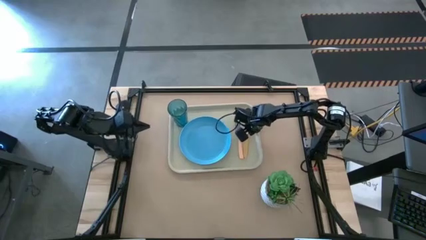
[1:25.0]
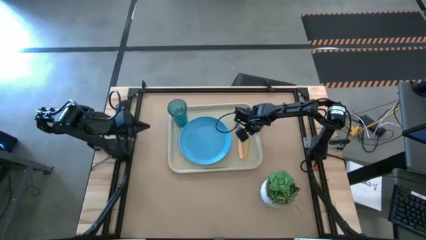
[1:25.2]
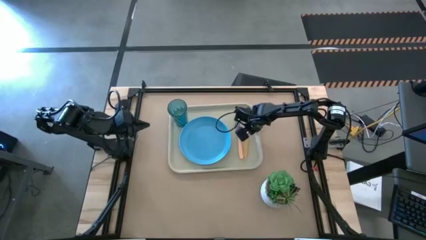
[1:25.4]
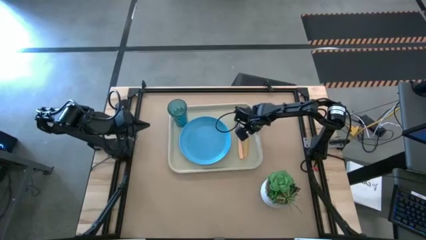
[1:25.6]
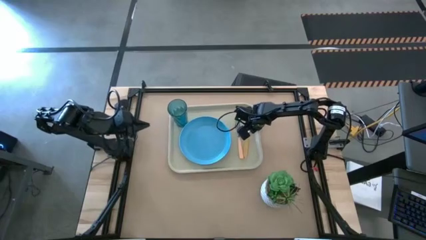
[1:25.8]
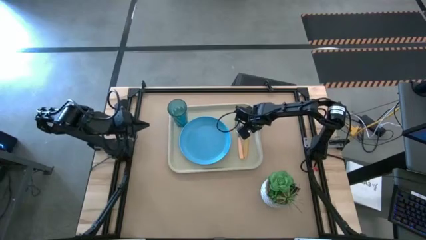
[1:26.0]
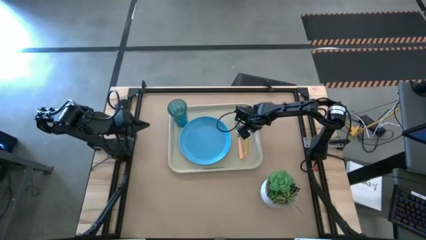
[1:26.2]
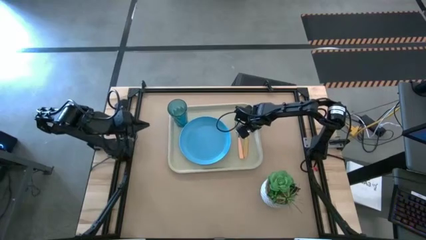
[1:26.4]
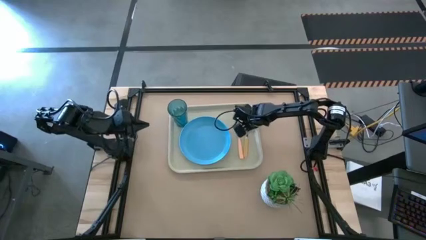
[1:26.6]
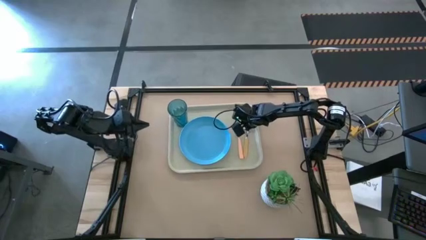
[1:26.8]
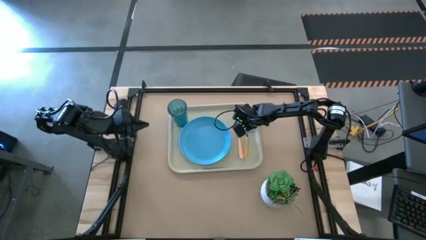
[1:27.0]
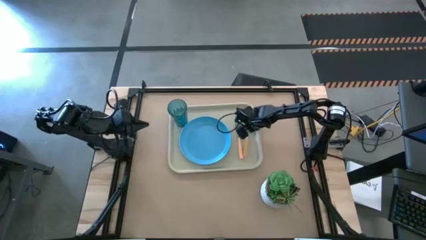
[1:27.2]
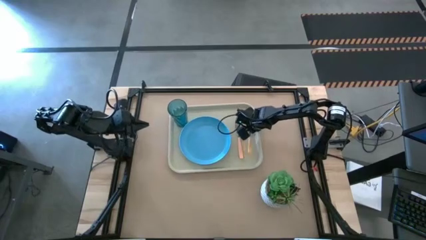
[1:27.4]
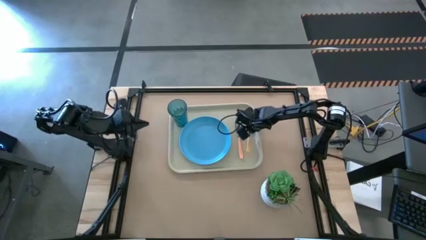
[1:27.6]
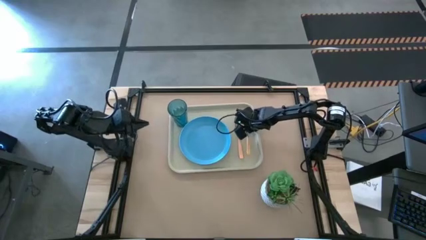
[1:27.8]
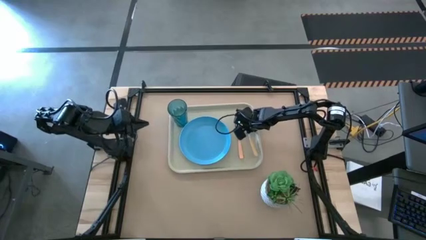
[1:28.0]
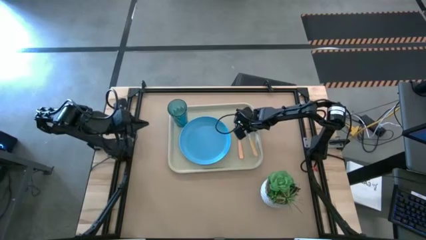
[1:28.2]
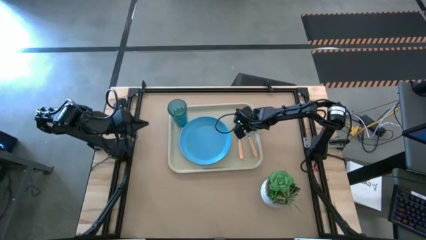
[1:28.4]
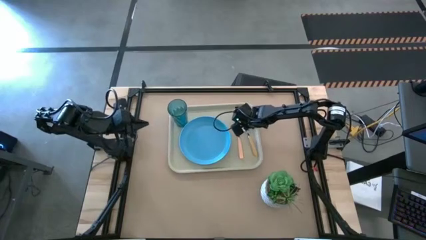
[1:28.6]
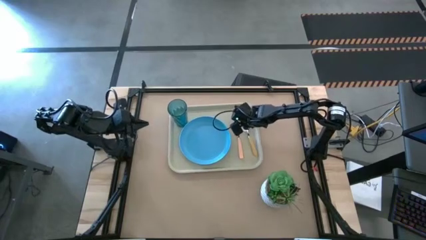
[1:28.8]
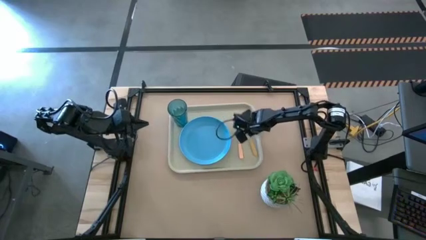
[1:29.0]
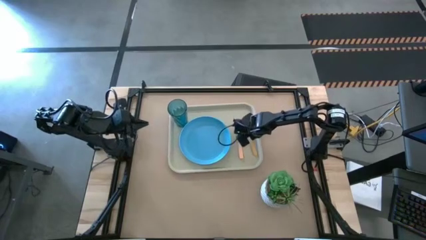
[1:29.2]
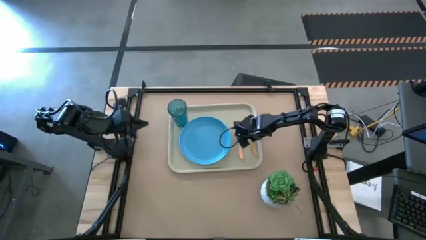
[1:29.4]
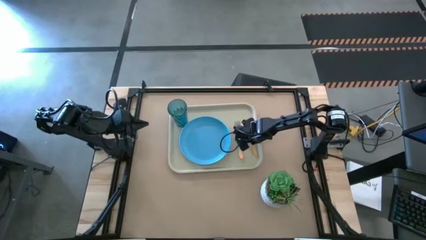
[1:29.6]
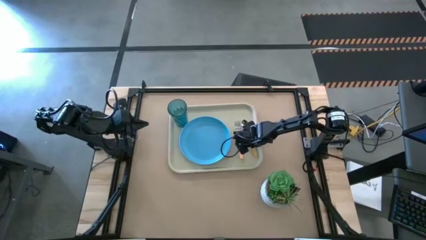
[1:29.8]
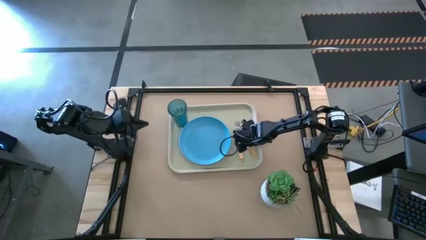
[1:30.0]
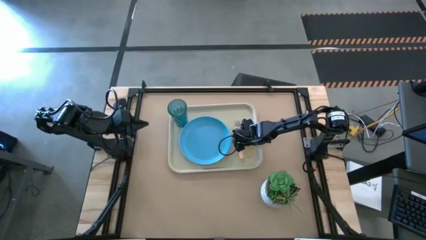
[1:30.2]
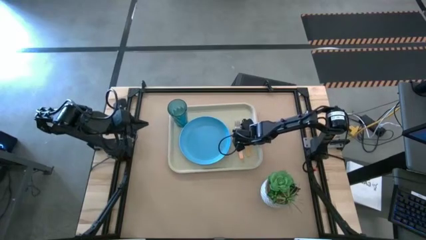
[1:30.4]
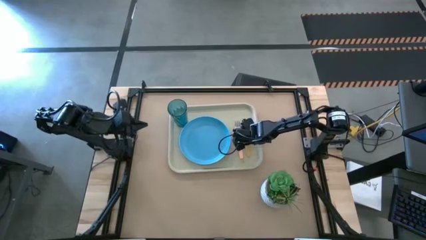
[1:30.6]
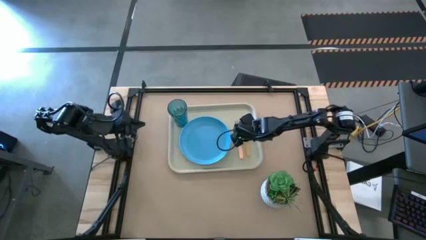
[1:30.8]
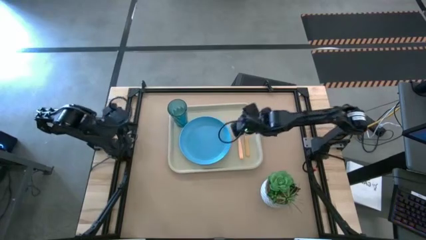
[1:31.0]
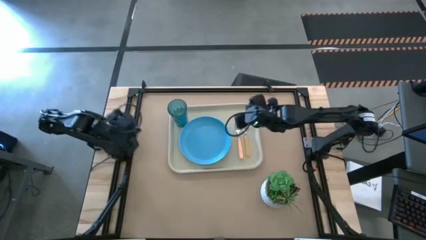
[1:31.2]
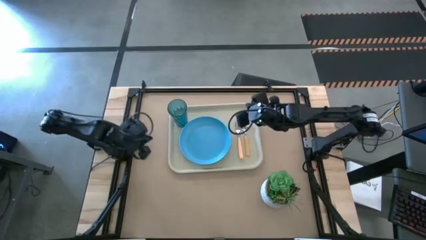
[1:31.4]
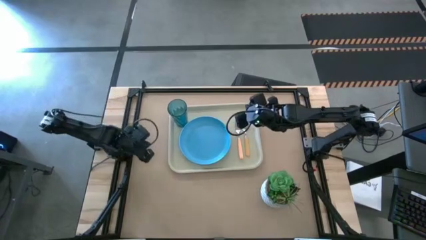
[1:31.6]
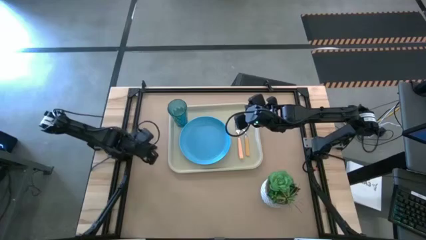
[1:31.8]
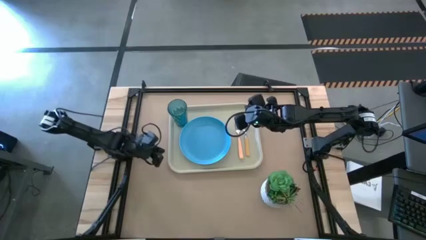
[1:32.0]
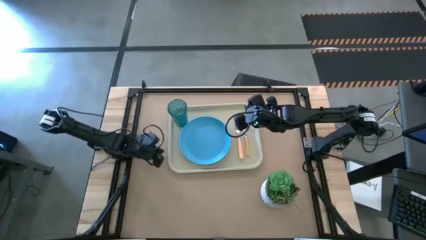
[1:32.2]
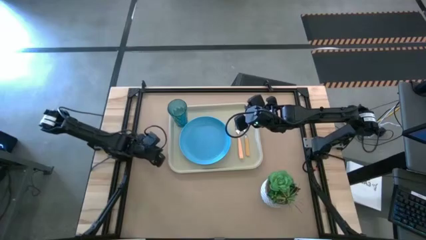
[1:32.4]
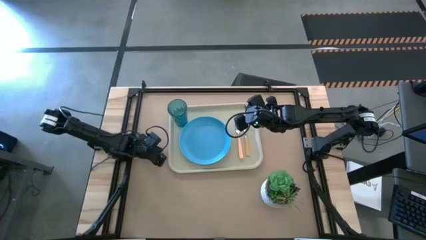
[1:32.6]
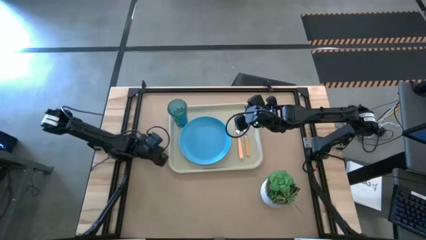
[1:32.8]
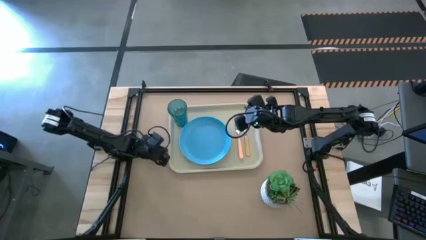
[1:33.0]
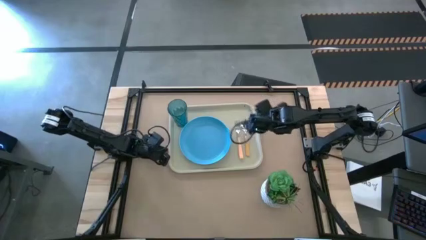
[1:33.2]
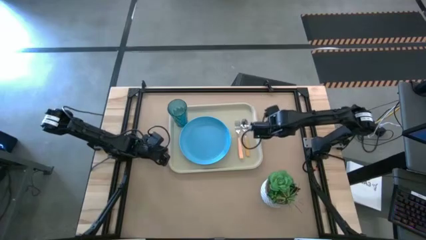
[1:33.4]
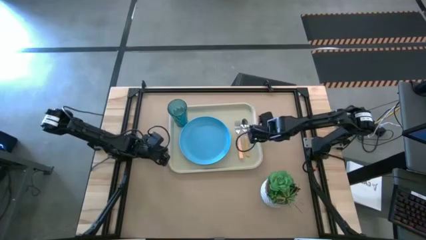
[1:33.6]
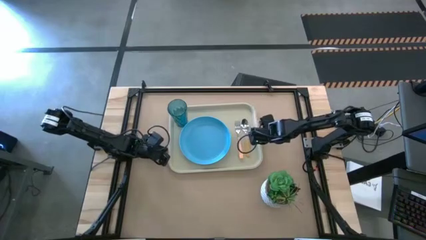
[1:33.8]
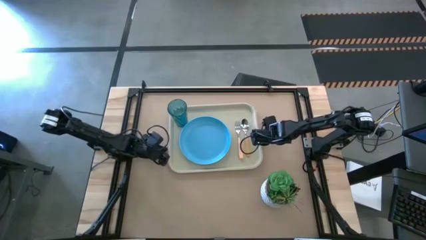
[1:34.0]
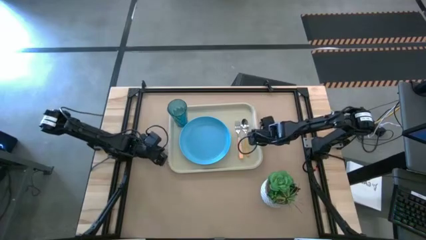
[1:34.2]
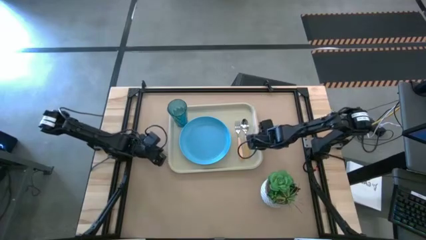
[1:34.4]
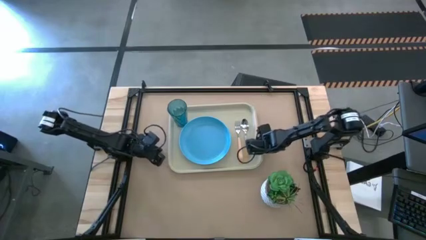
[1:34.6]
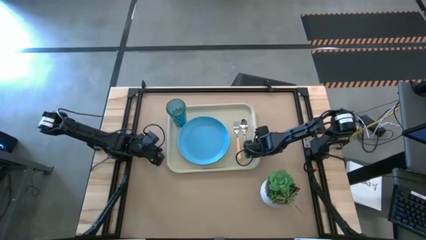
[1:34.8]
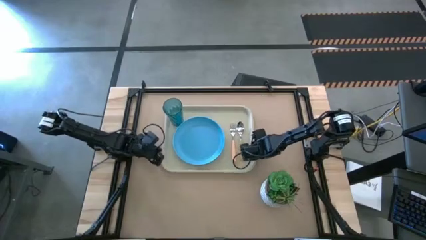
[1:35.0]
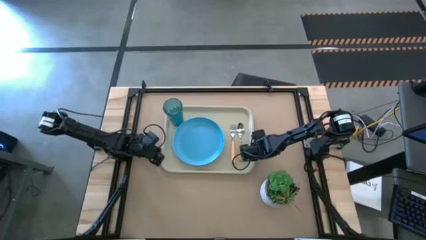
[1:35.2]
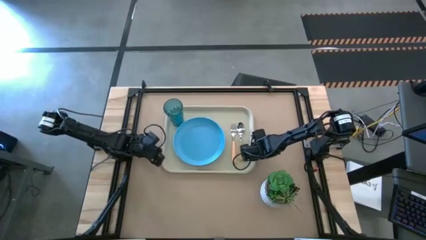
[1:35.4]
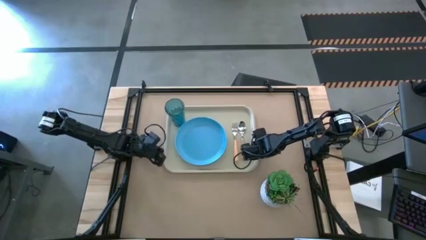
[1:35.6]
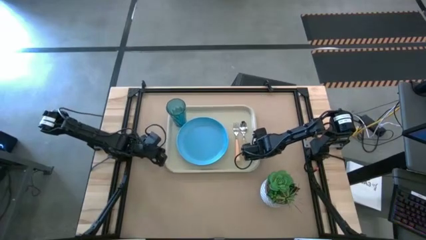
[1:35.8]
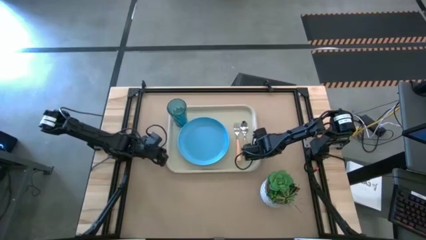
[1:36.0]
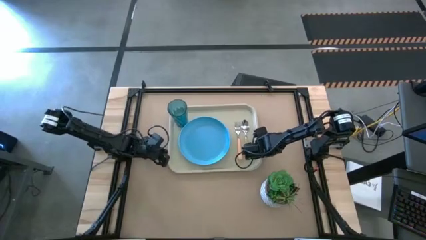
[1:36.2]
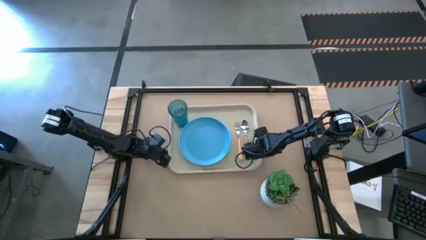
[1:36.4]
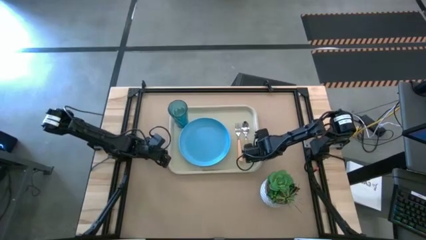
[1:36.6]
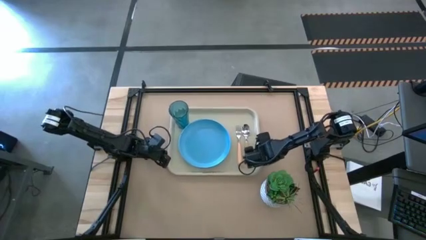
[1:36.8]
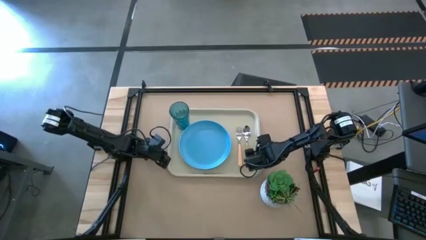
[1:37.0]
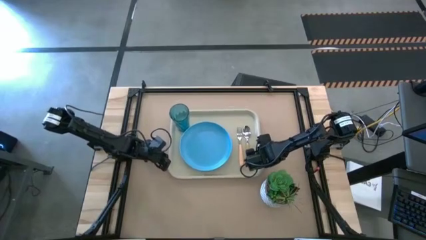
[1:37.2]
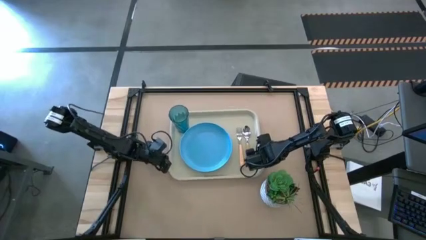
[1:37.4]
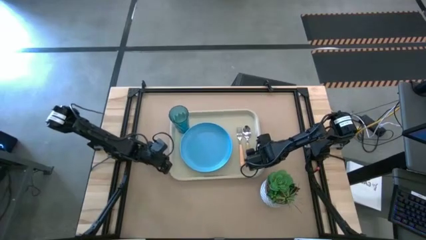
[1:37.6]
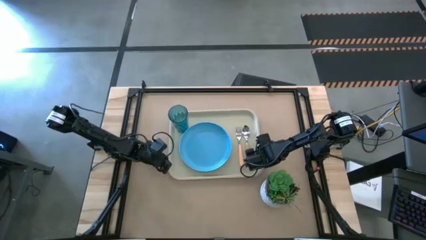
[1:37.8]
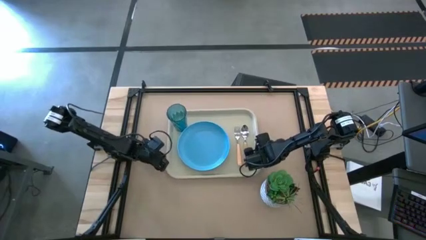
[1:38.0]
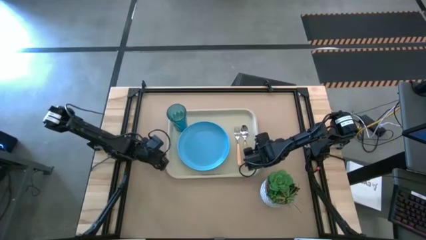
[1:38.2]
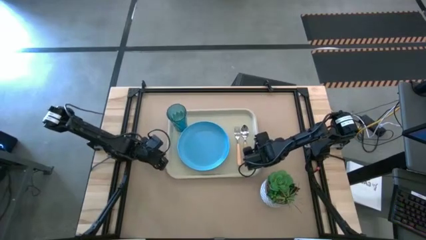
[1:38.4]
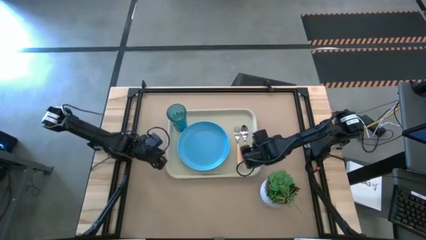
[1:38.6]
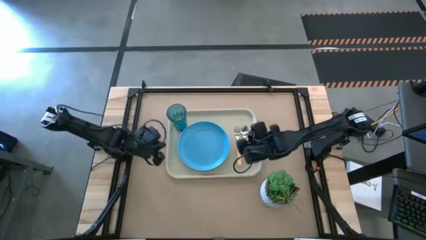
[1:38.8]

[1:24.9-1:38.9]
Task: Pick and place plate/cup/fork/spoon on tray
Move the white serving tray to the center of the table

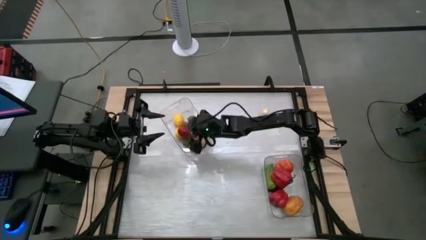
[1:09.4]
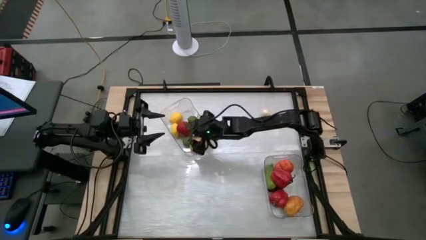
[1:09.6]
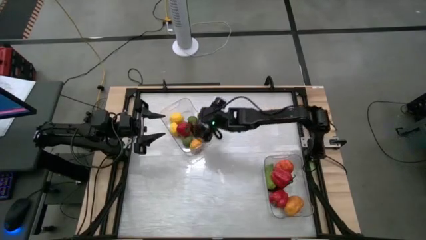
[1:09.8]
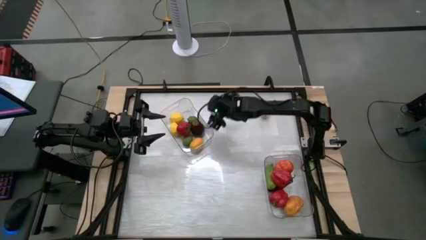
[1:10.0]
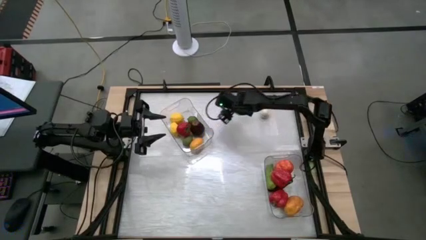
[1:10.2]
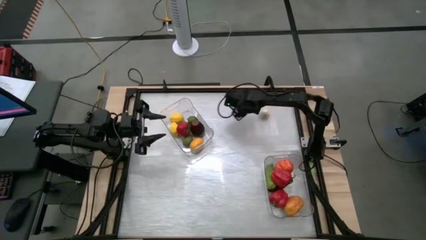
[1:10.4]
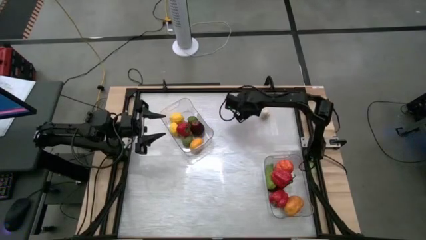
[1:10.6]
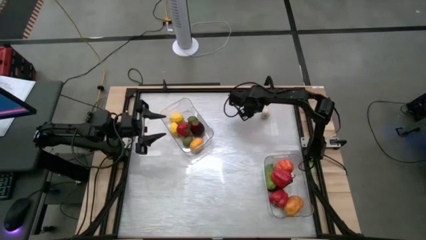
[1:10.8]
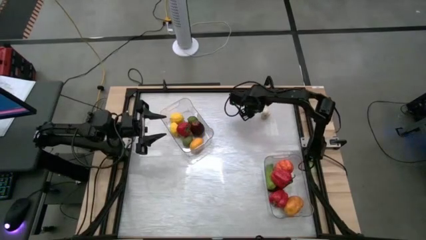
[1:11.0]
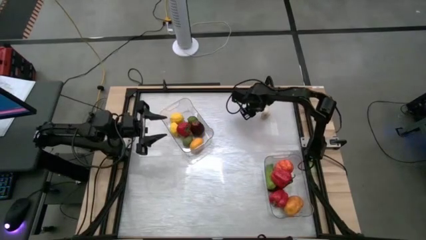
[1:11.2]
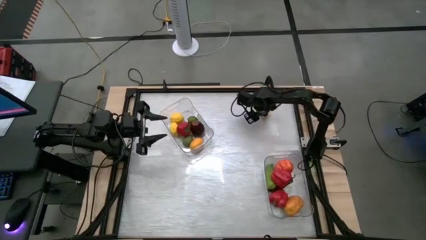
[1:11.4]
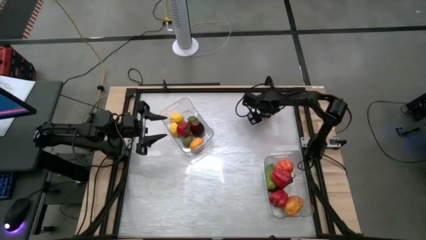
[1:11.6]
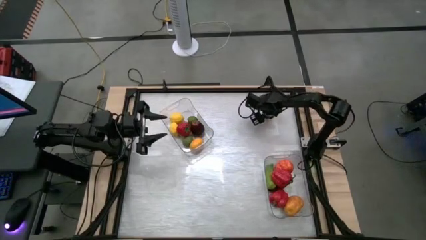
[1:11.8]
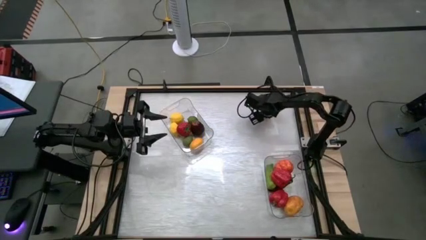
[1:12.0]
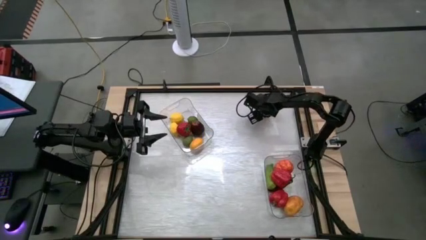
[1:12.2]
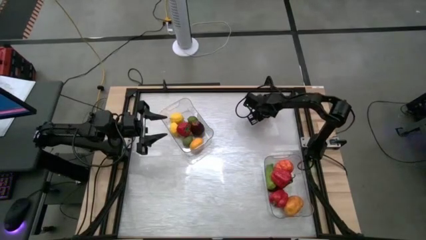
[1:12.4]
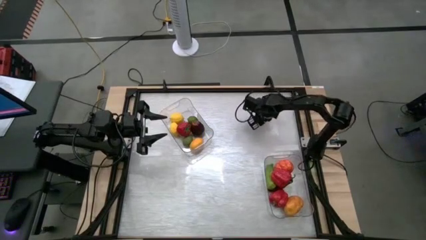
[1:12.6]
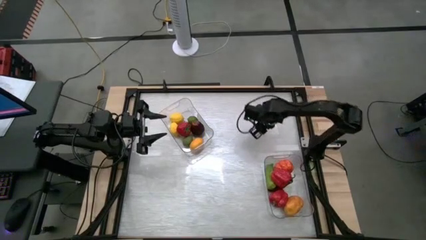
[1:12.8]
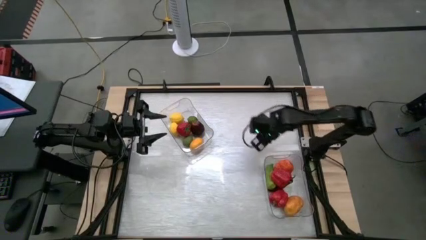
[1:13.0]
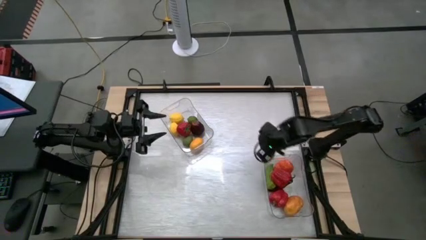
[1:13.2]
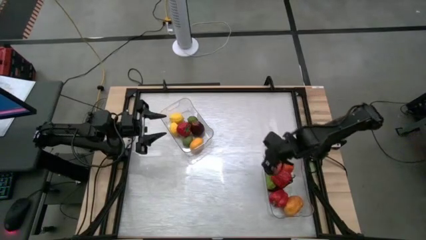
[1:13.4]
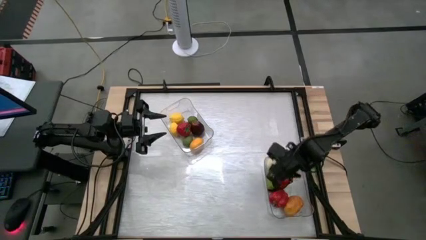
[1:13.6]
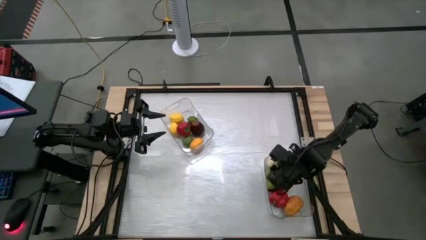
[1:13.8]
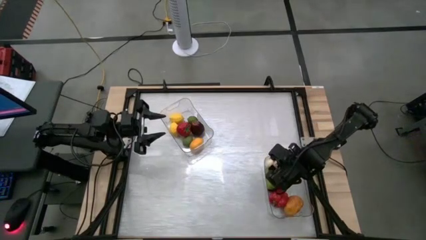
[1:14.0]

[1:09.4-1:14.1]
Task: Sort produce into baskets
Put the white garlic into the bottom transparent bin
